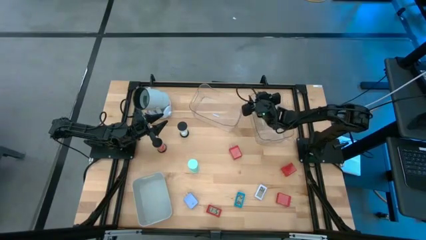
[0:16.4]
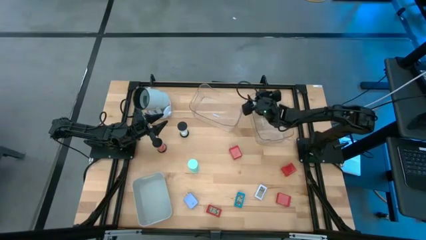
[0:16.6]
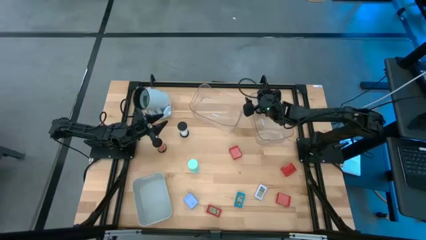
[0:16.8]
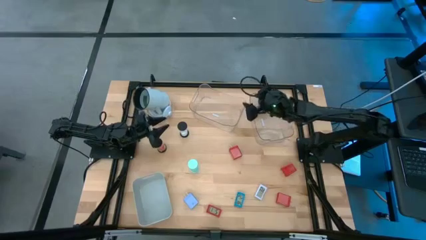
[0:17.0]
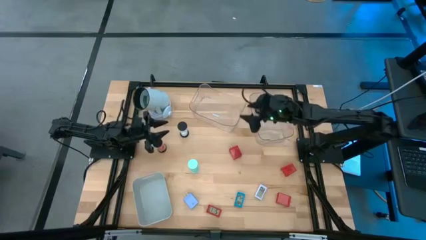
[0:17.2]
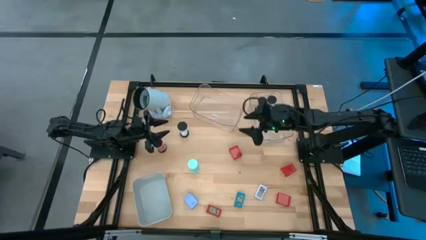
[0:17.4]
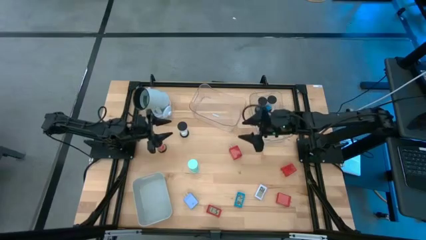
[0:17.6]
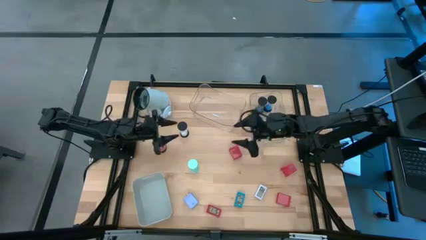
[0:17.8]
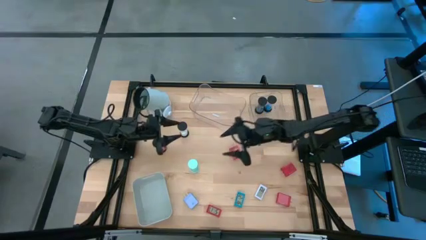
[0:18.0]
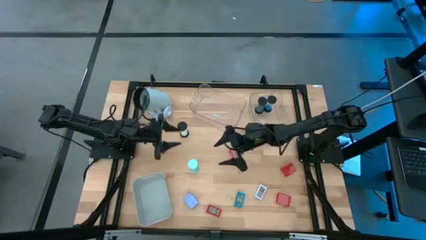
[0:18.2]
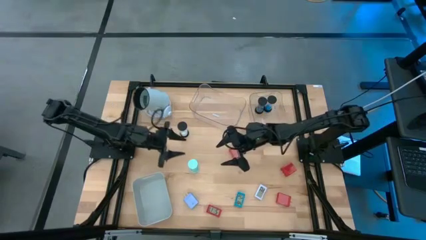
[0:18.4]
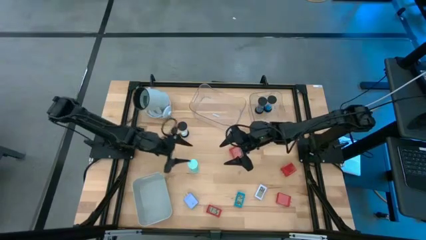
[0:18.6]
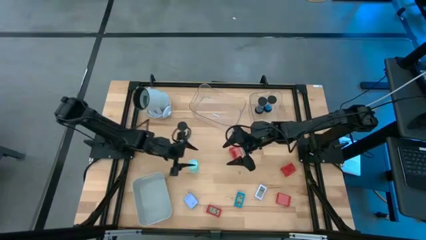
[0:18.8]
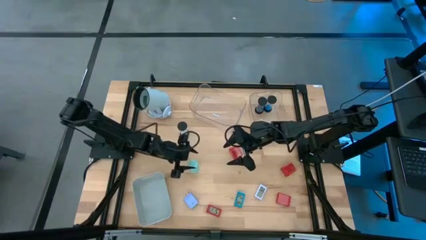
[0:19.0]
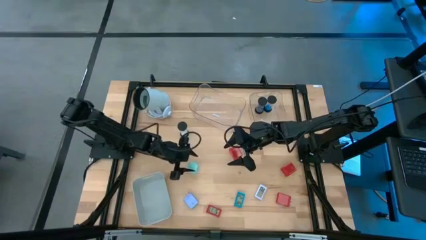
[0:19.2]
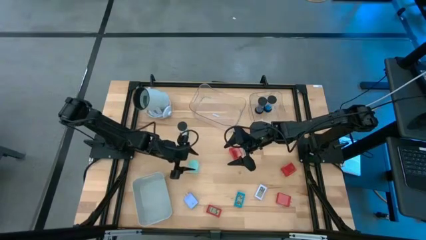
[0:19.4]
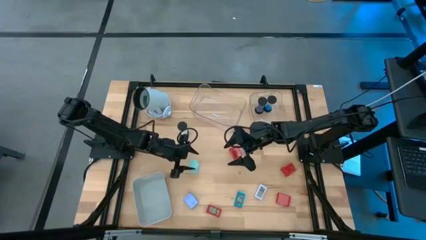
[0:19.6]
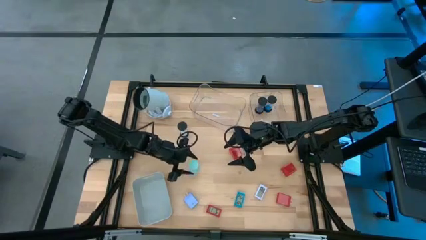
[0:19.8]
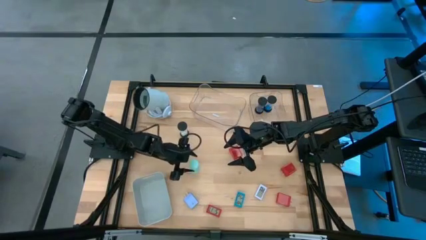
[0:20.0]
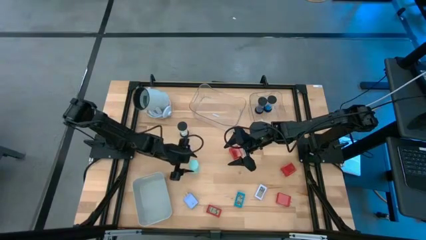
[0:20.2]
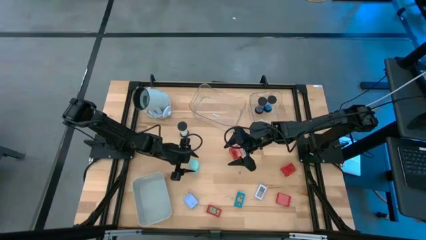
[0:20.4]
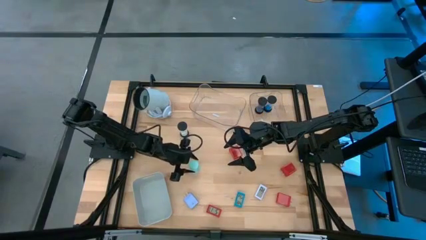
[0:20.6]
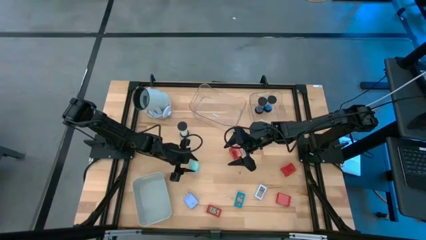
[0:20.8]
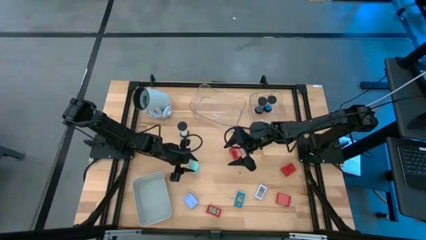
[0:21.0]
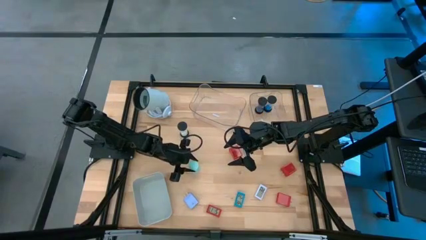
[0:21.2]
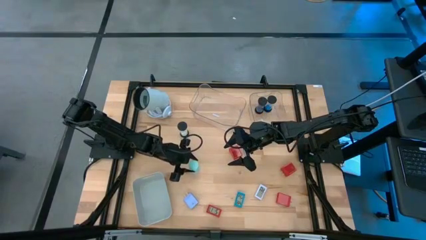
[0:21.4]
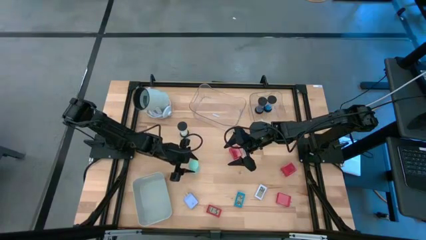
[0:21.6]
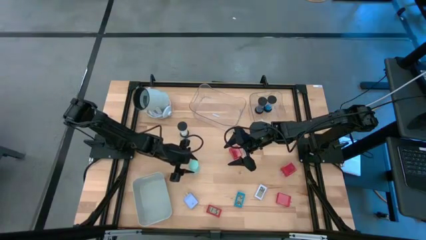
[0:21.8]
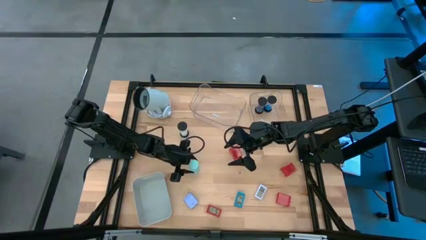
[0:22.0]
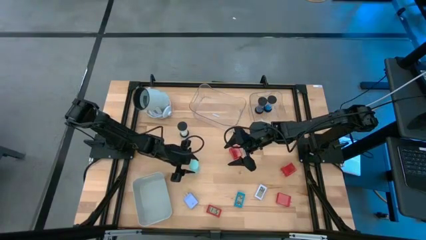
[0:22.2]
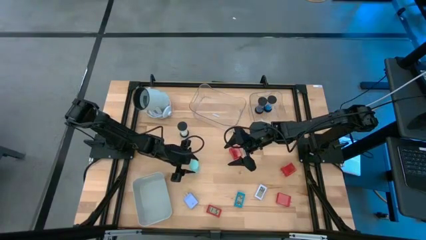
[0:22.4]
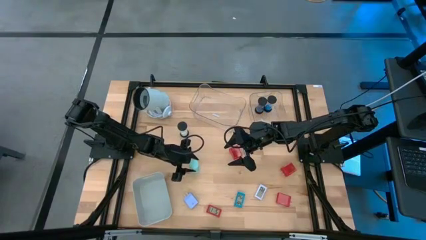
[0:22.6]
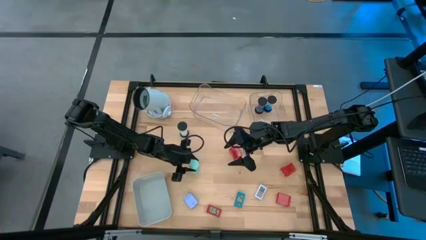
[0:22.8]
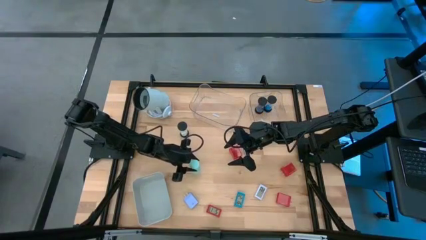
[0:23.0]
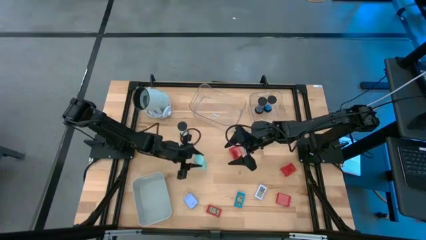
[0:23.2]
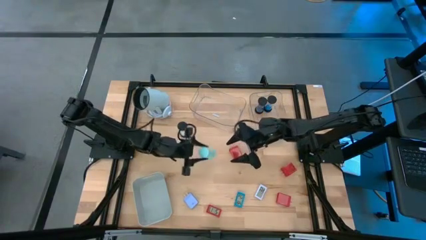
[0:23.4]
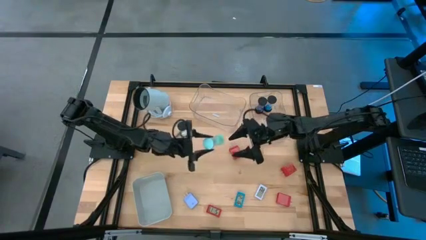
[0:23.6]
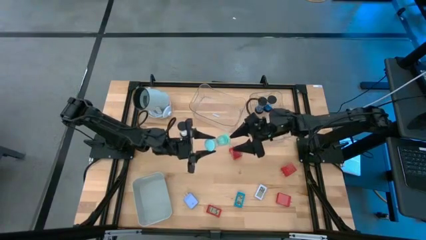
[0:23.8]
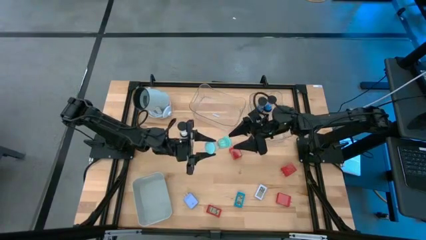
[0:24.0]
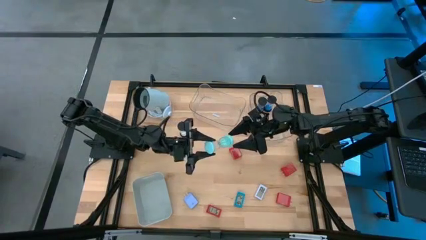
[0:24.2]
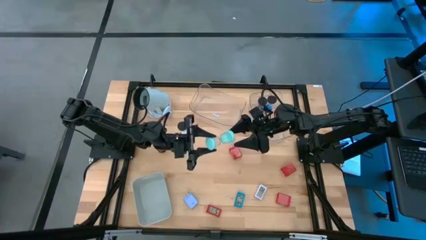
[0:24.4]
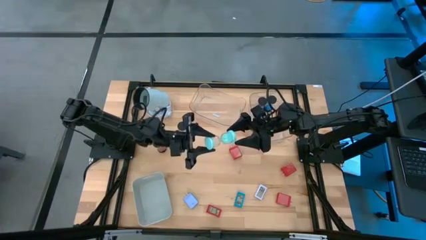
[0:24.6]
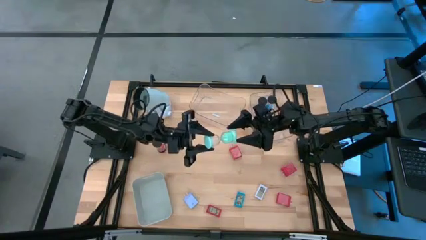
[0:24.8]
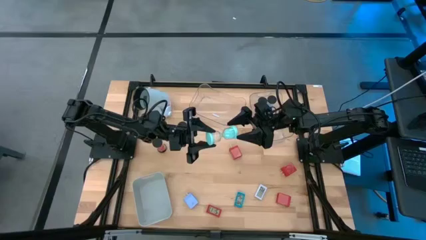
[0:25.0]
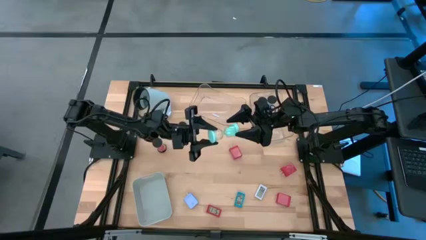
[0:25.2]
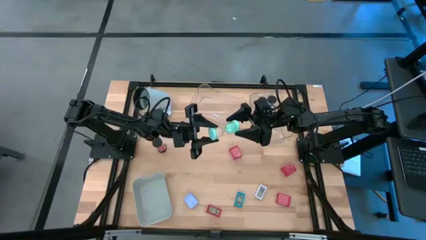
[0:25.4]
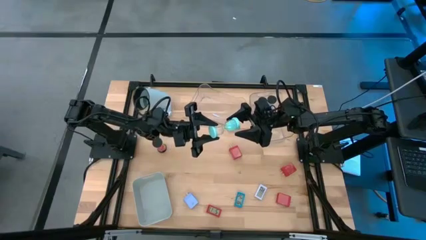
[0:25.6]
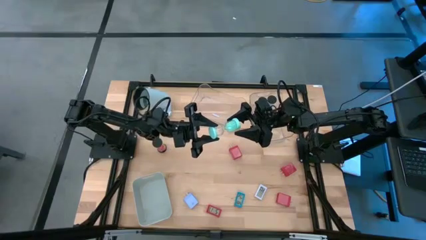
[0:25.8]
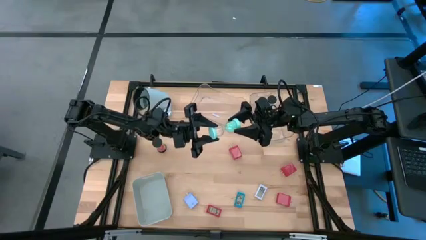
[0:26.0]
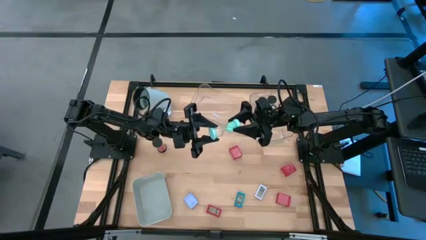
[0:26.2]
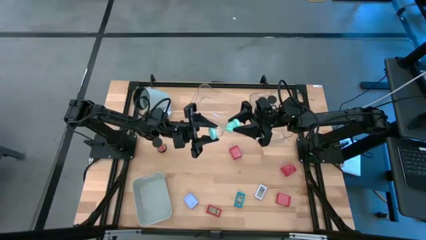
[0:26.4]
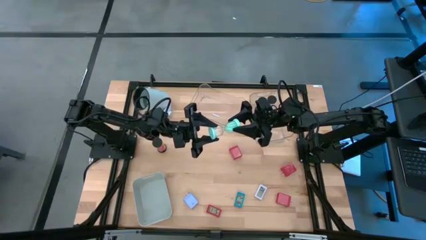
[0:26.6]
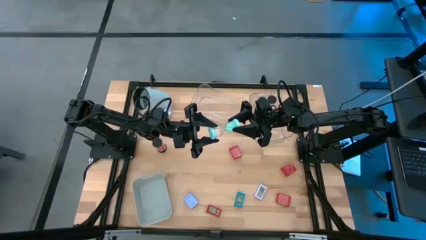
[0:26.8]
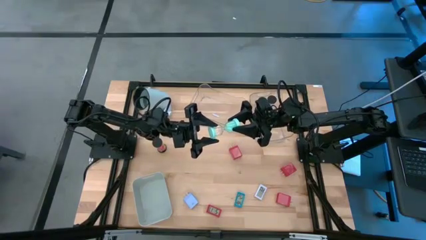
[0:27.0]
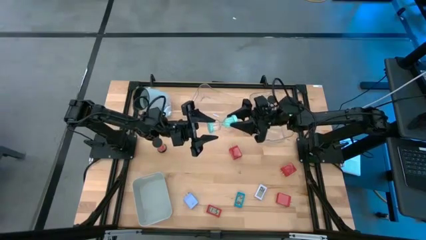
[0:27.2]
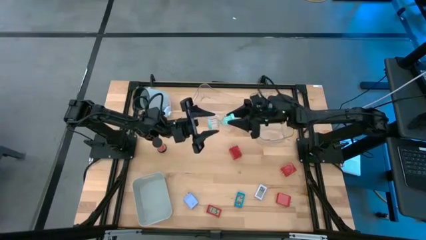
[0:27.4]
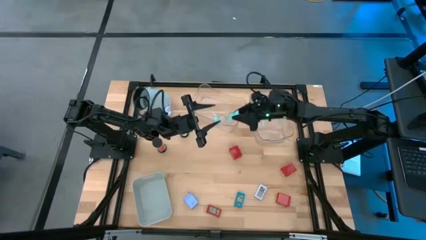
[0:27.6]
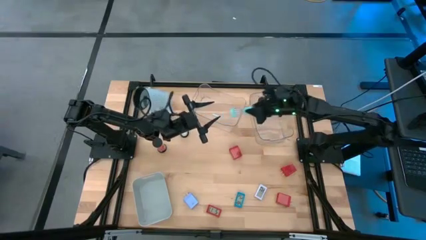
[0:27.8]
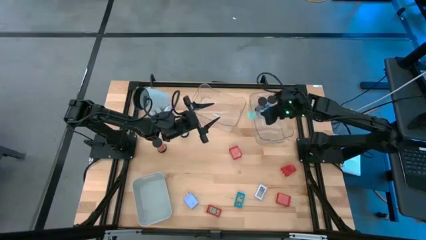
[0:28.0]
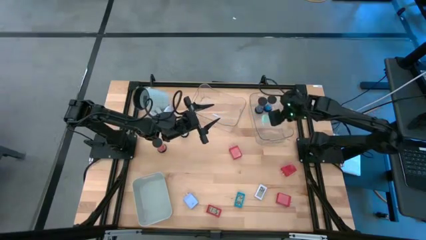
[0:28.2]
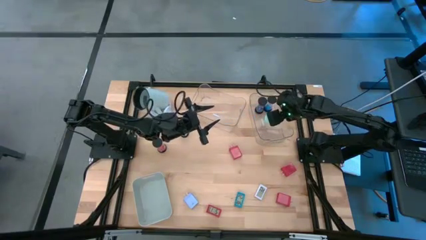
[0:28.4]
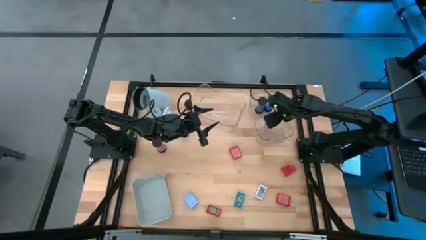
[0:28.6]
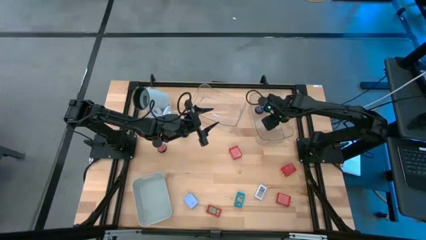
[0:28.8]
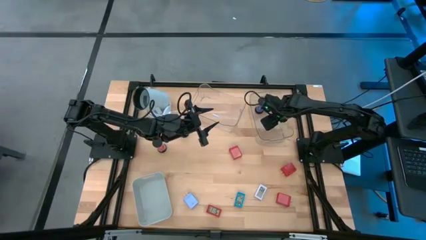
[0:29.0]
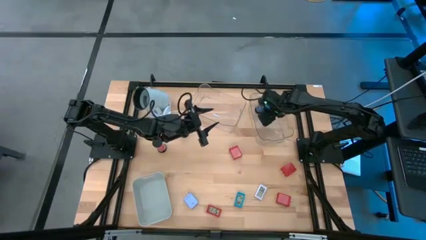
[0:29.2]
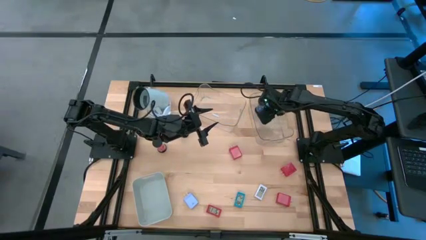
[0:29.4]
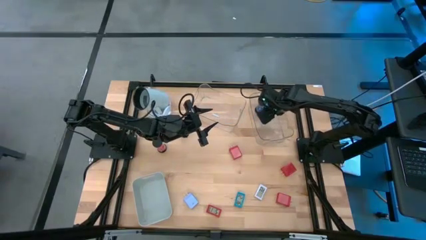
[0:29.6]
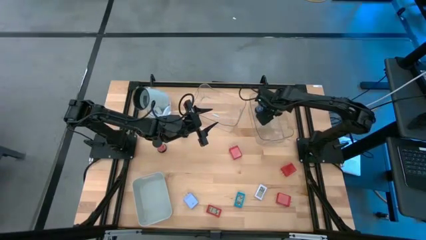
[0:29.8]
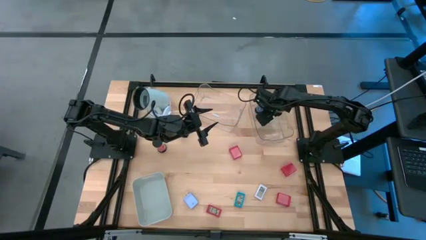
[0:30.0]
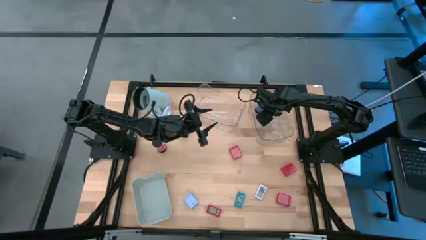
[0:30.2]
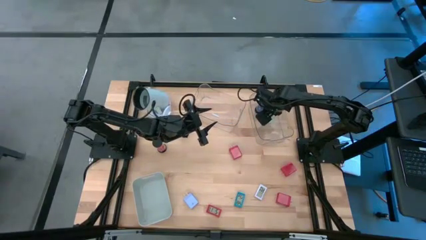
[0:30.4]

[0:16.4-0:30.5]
Task: Pick & Place Office items
Put the light green hourglass into the right transparent bin

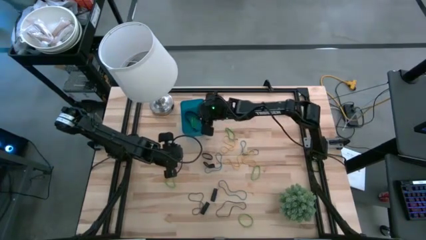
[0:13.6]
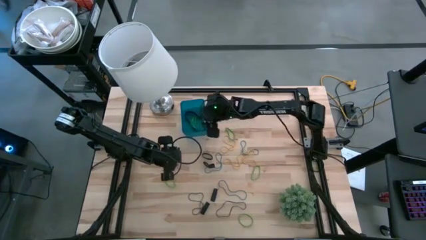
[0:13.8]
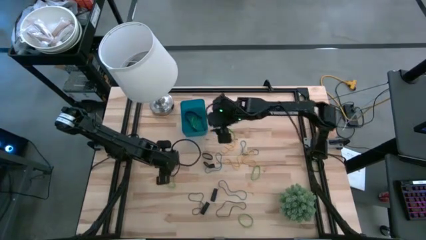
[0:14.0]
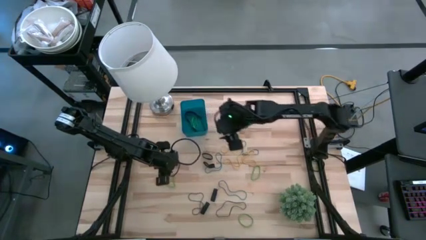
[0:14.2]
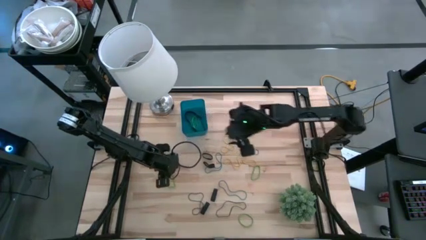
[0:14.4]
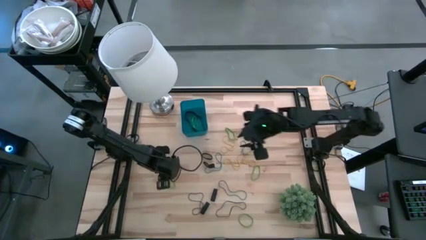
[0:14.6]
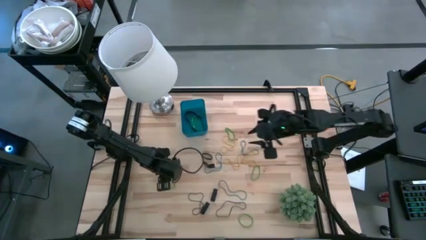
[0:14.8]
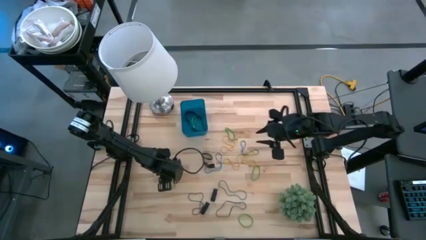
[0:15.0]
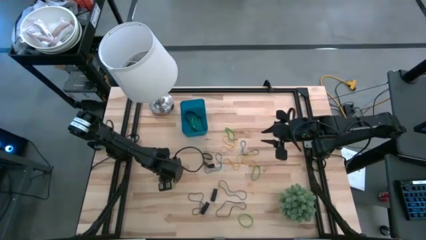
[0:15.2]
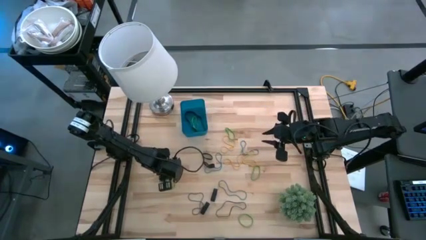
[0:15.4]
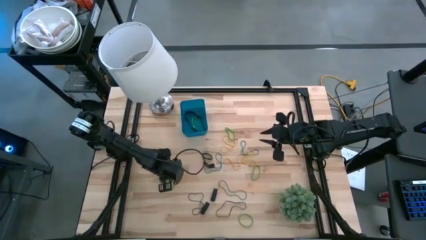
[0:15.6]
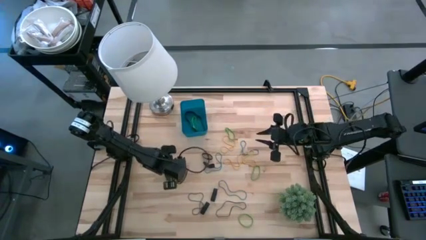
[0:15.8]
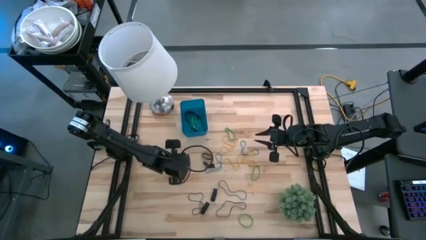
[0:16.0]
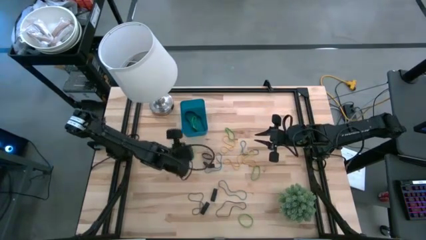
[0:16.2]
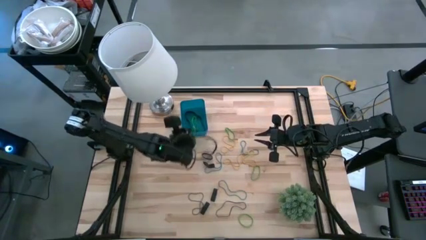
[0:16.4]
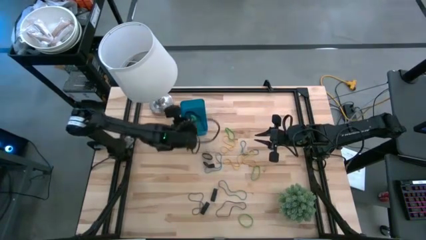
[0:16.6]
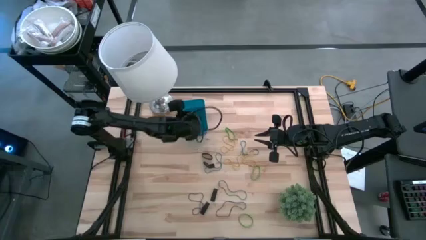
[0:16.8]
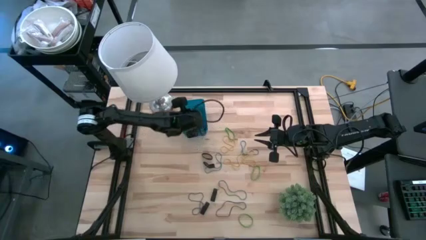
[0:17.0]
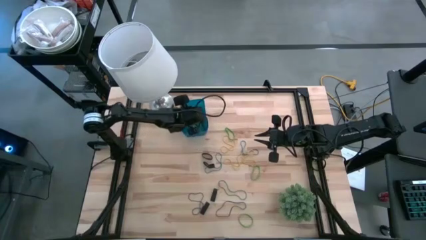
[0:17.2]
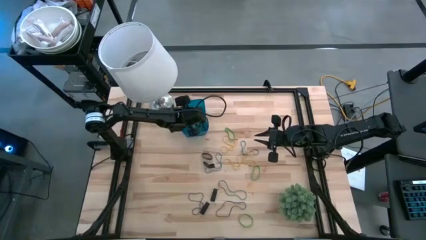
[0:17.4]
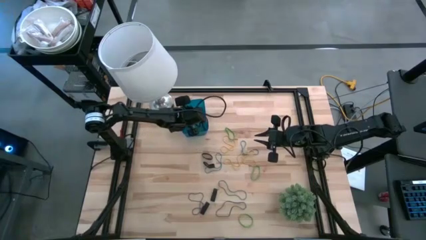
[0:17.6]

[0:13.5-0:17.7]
Task: Pick and place rubber bands into bin
Put the green rubber band into the blue bin
